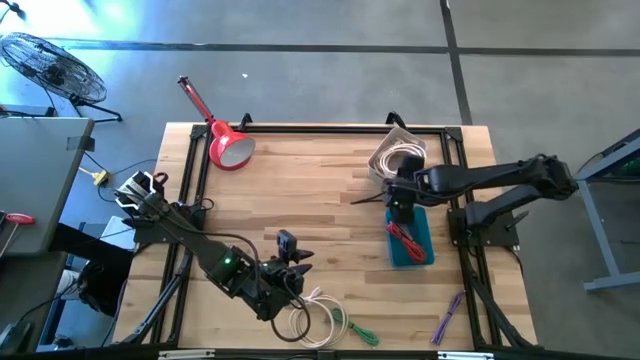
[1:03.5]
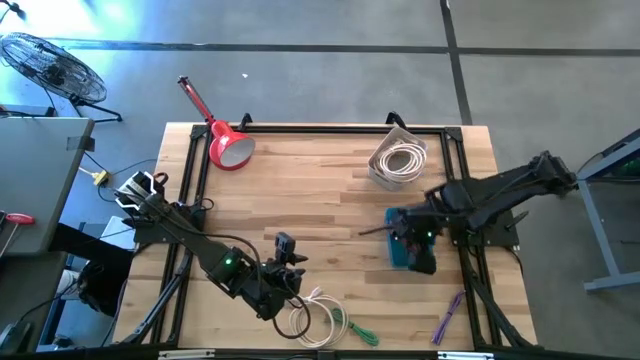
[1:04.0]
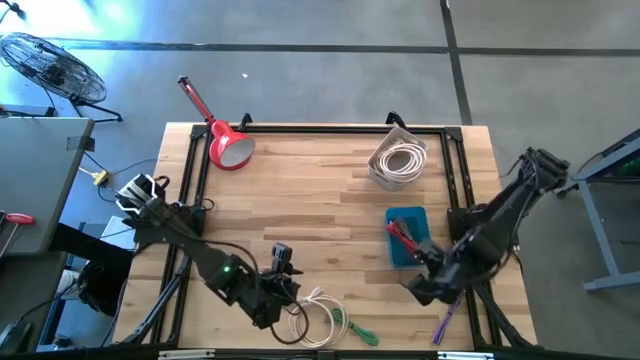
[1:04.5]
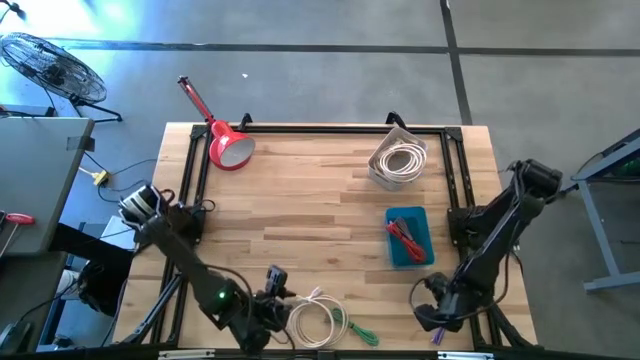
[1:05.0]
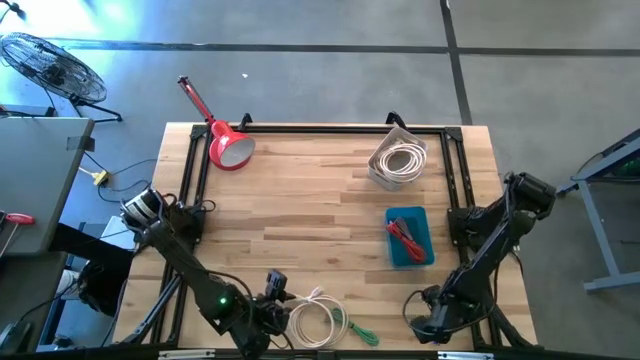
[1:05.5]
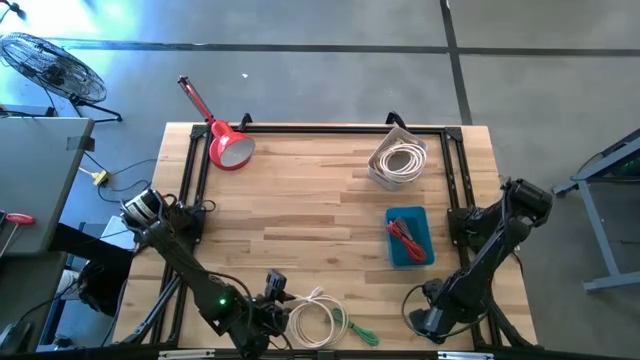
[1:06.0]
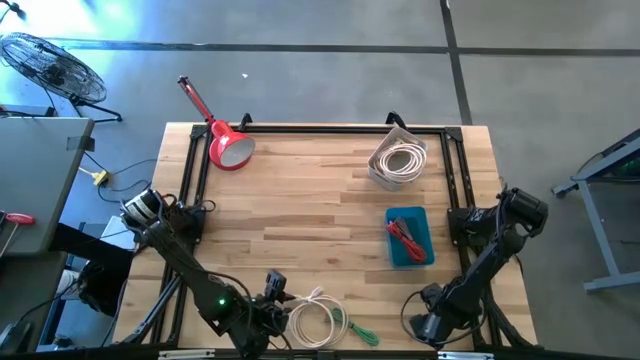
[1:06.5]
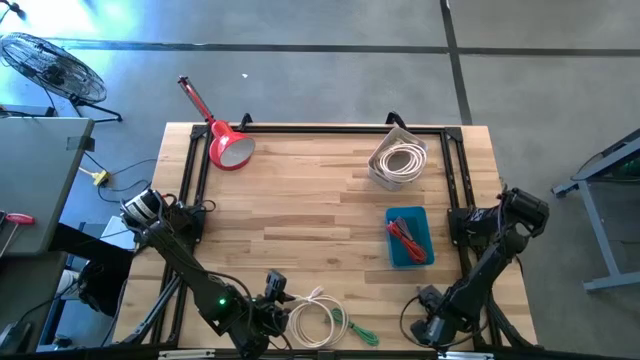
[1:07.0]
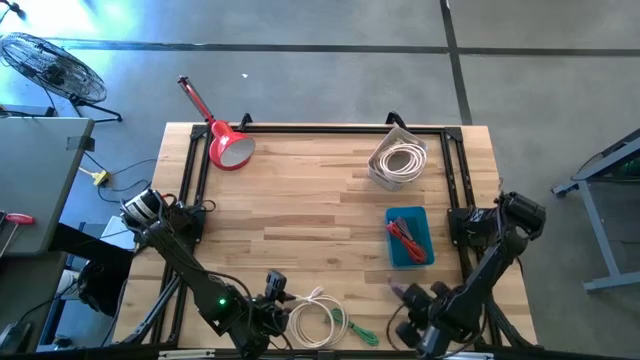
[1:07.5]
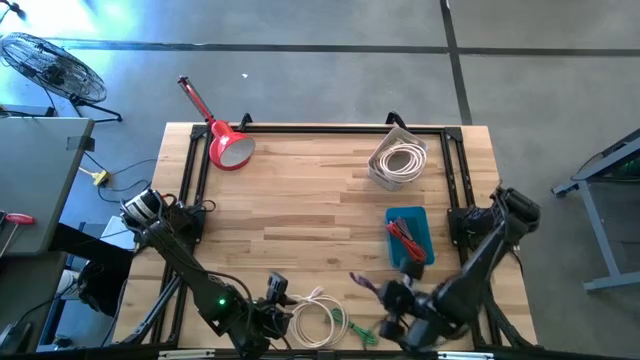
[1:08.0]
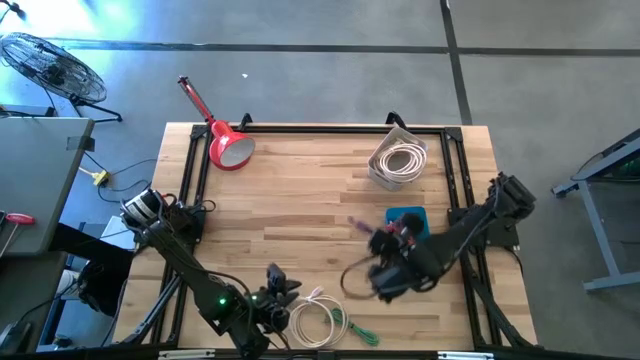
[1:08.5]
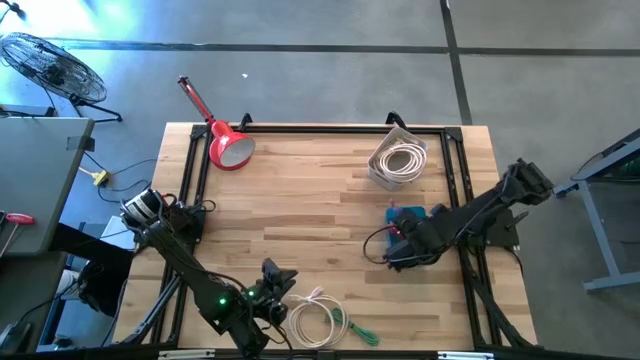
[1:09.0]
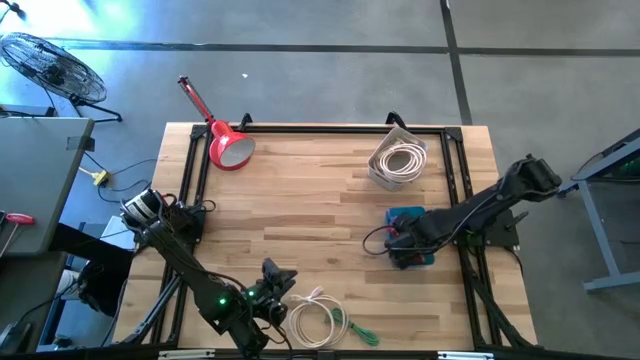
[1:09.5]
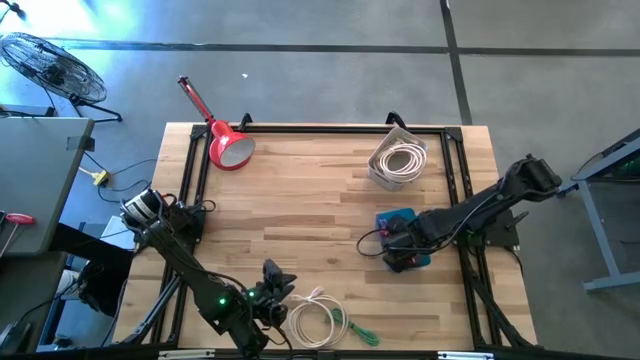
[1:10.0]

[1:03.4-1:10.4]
Task: Pick & Place USB Port
Put the purple charger cable into the blue bin

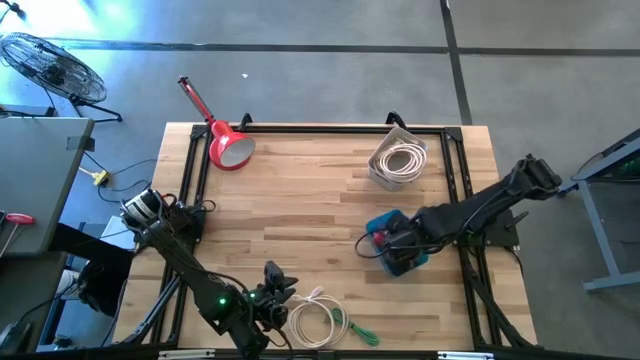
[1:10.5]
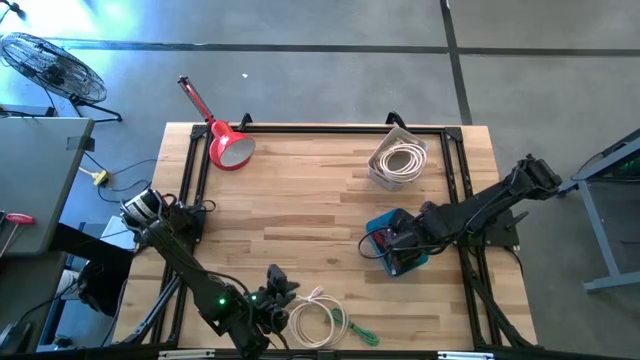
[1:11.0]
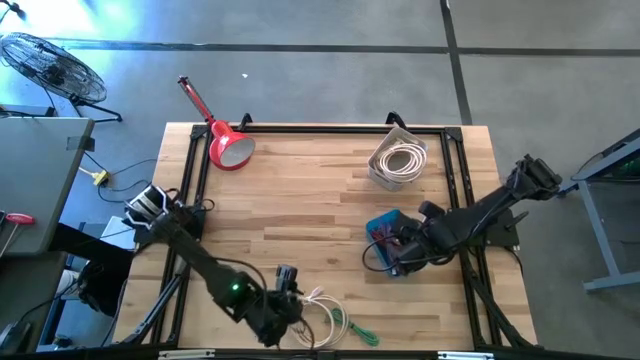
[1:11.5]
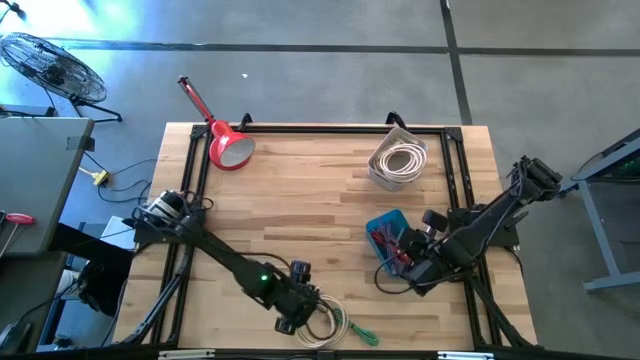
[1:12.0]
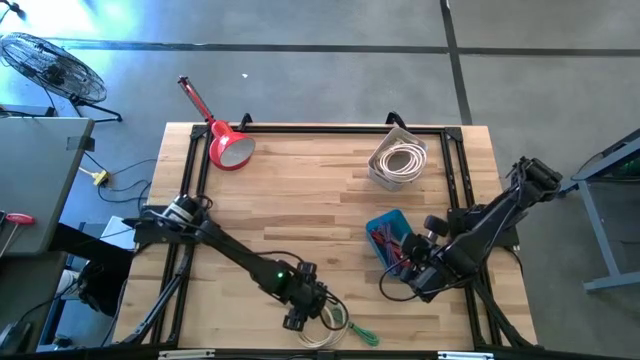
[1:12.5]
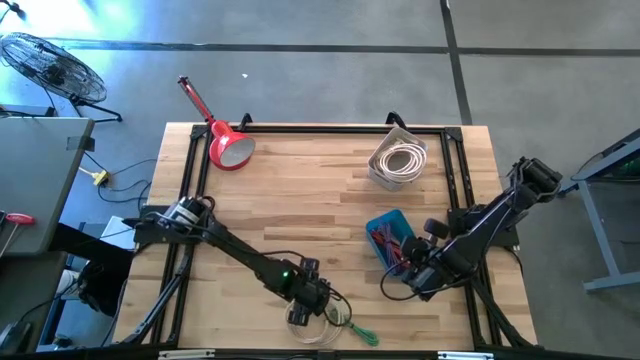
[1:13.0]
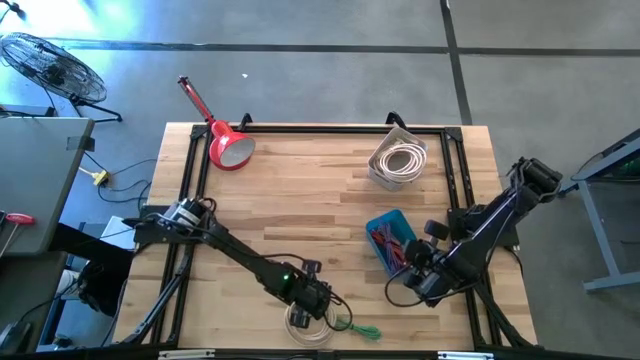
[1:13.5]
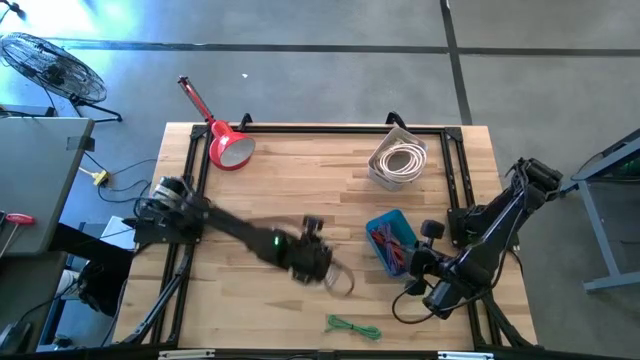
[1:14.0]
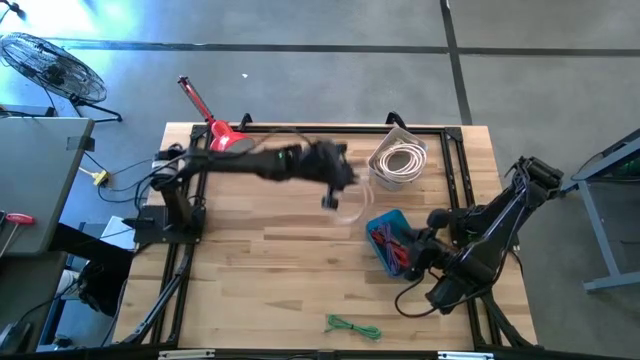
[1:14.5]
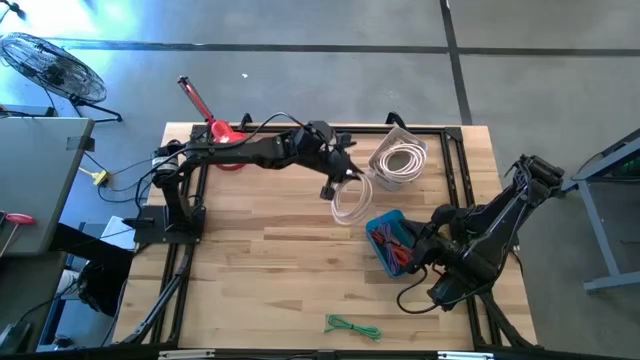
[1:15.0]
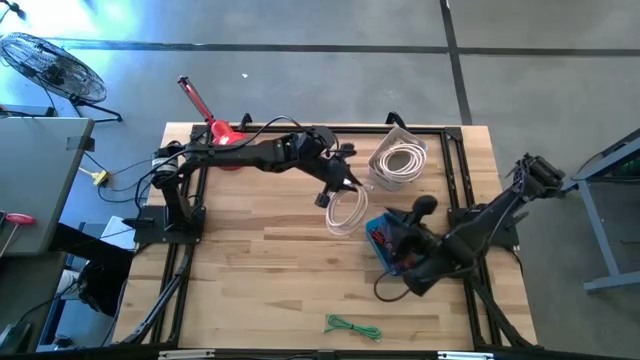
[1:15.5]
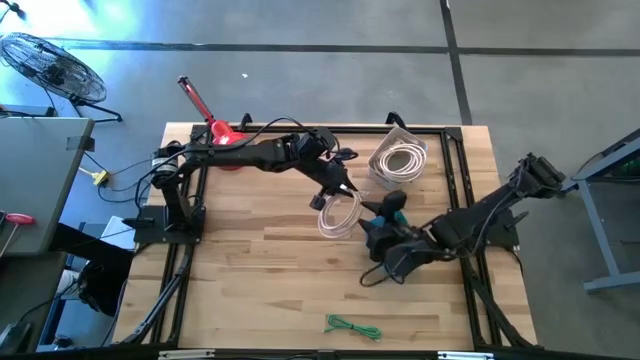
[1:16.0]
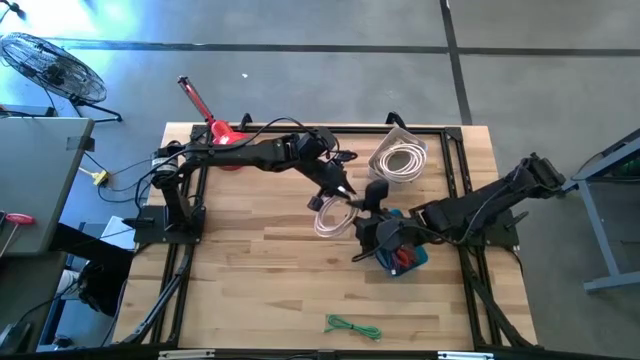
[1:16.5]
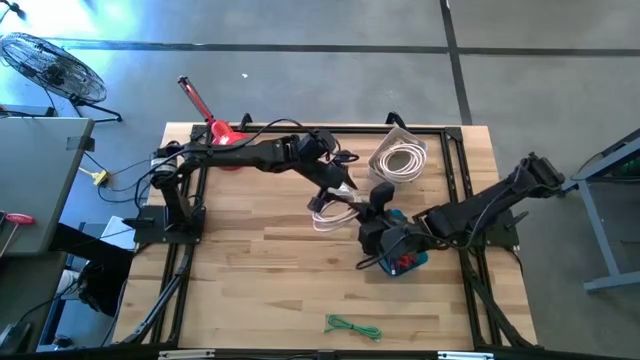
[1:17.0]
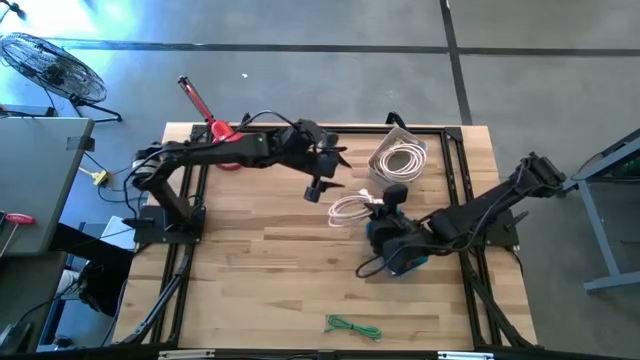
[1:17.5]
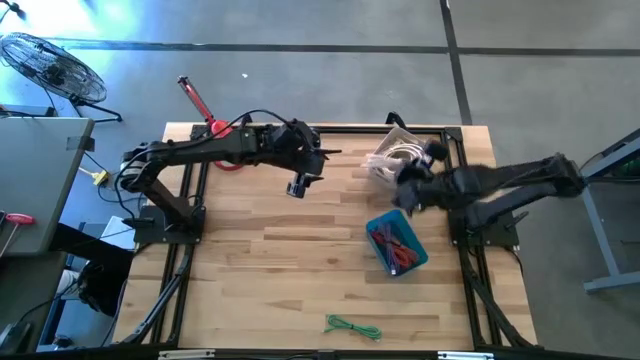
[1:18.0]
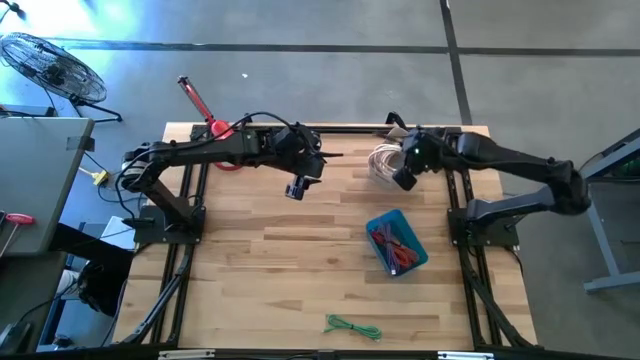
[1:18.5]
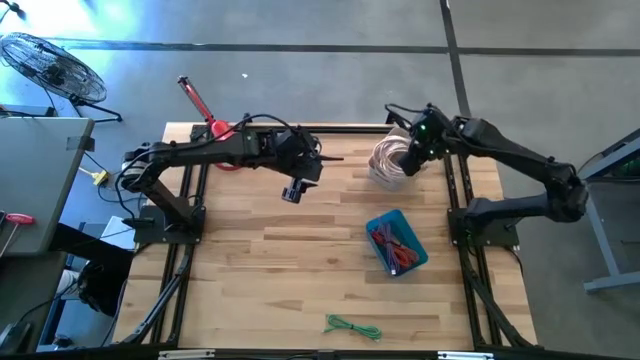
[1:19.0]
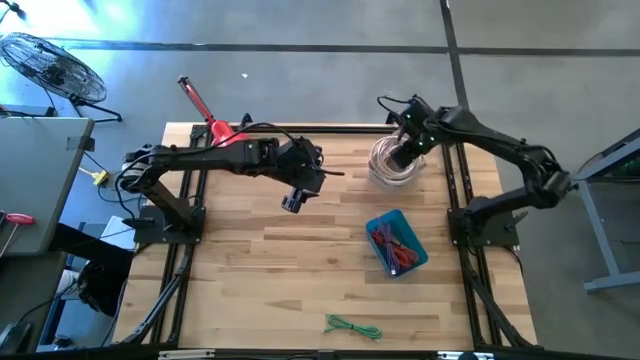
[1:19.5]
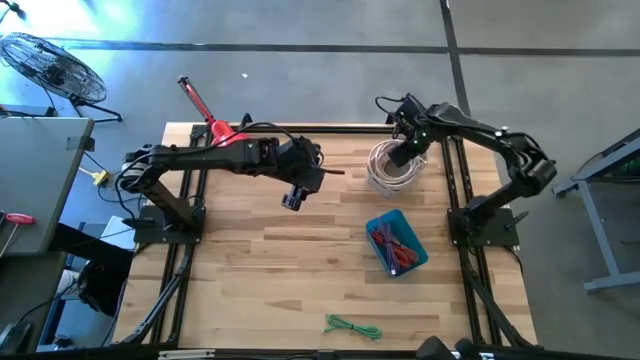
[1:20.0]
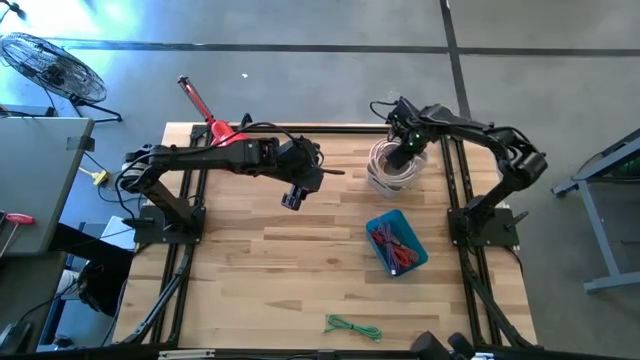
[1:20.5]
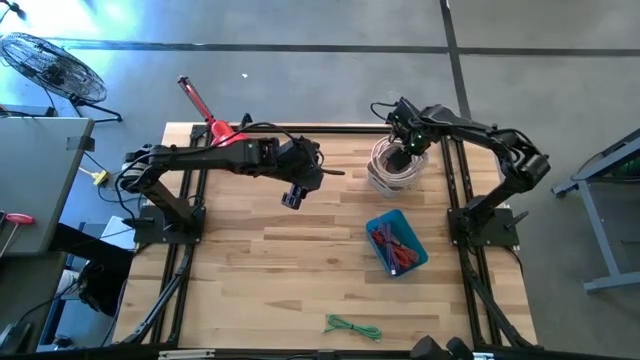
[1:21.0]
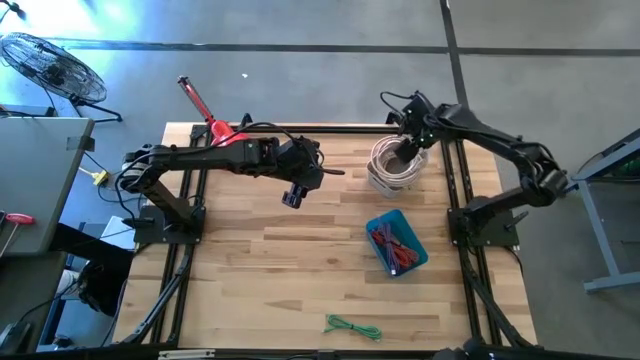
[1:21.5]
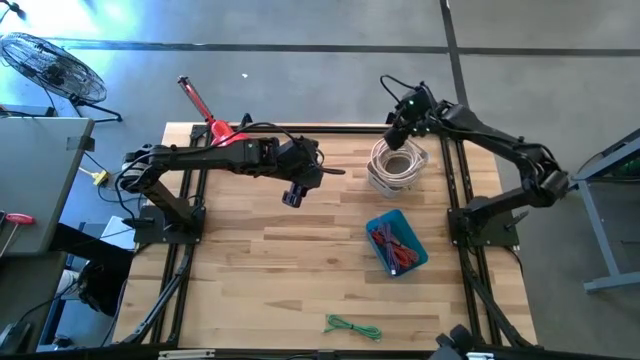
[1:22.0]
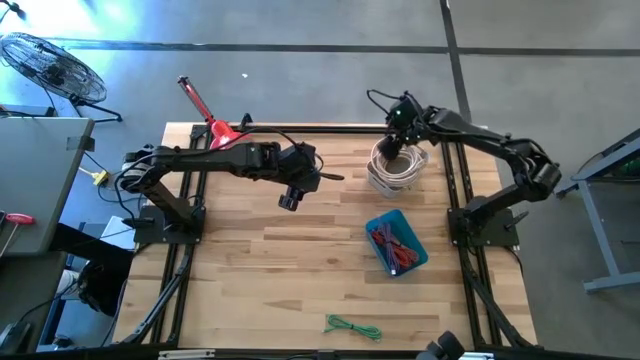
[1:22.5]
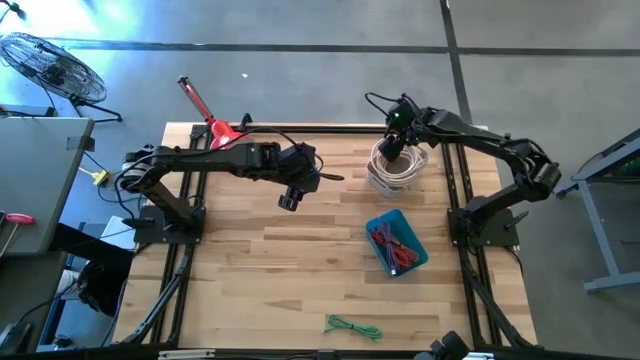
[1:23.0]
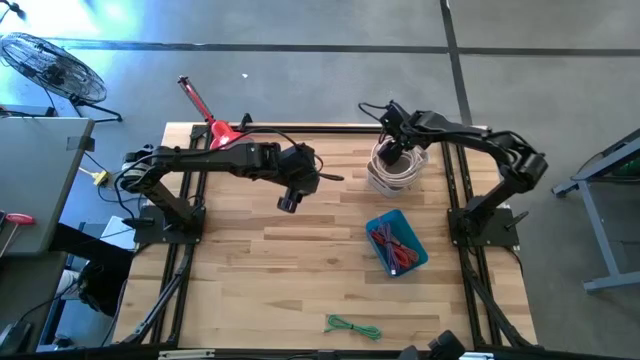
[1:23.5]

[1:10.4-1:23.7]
Put the white HDMI cable into the white bin
